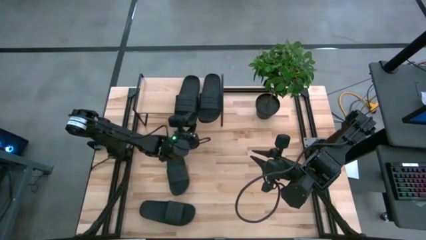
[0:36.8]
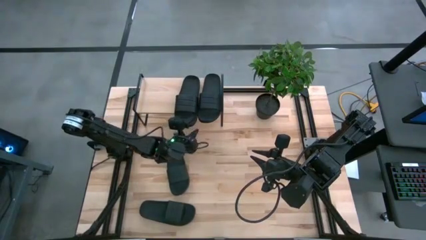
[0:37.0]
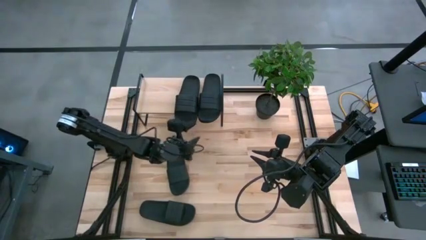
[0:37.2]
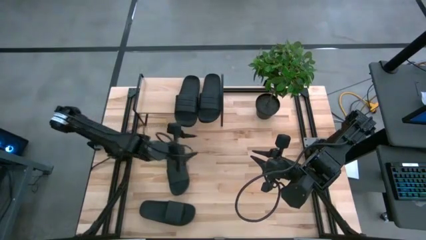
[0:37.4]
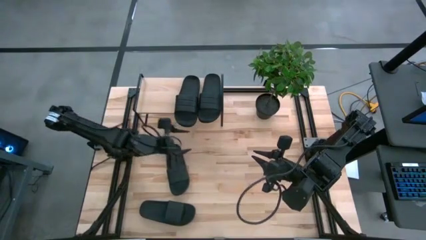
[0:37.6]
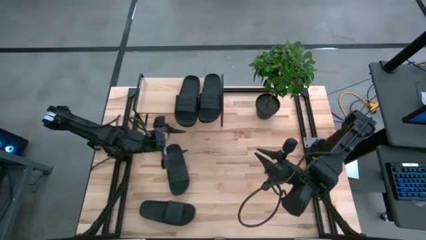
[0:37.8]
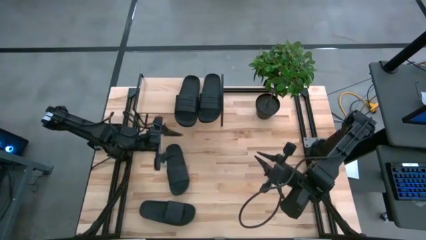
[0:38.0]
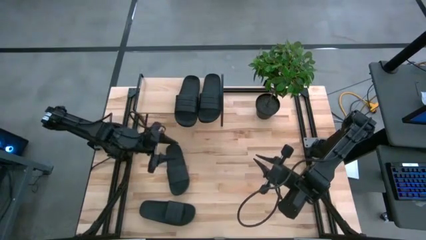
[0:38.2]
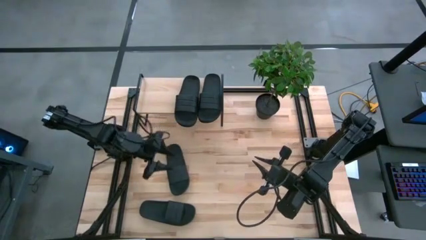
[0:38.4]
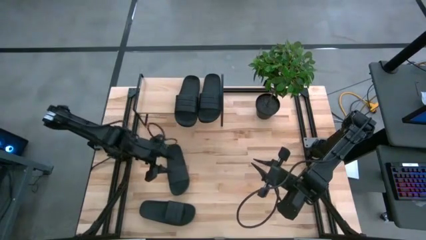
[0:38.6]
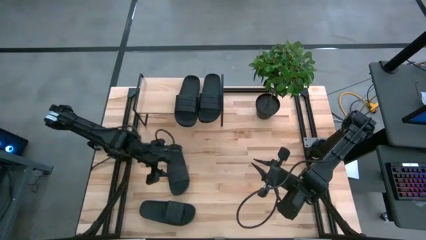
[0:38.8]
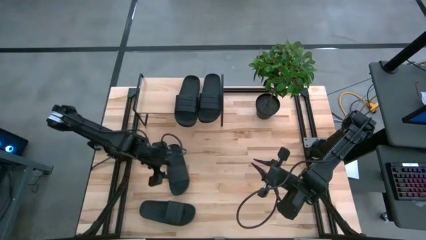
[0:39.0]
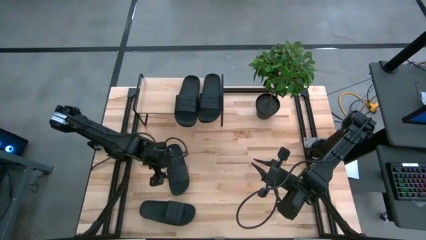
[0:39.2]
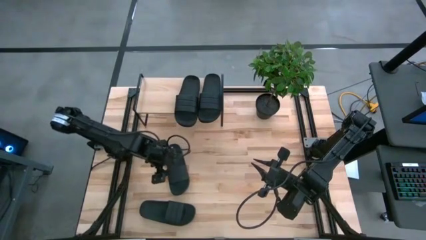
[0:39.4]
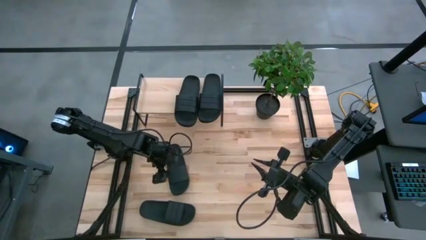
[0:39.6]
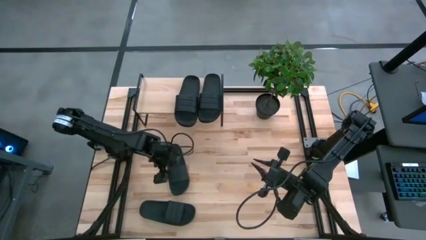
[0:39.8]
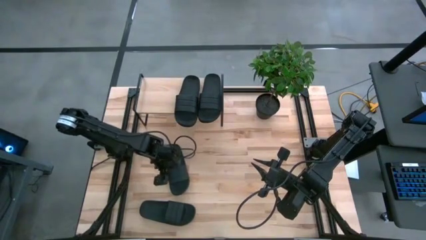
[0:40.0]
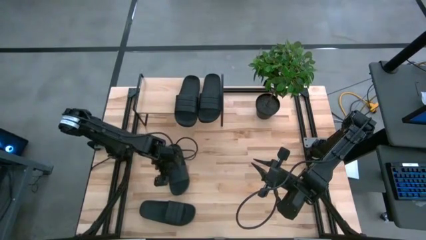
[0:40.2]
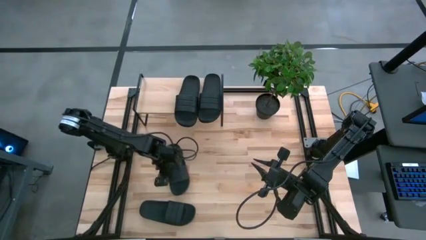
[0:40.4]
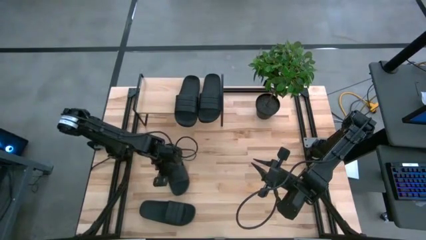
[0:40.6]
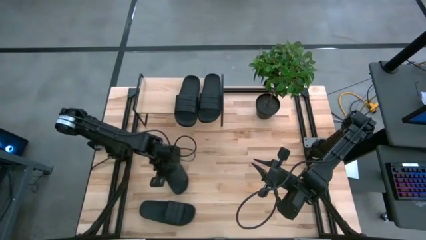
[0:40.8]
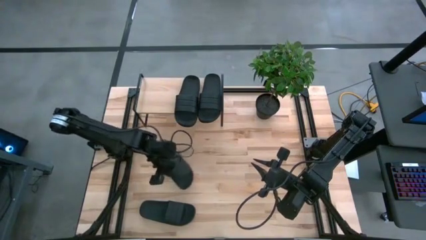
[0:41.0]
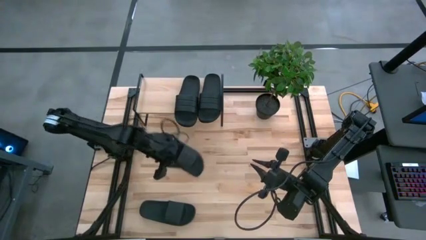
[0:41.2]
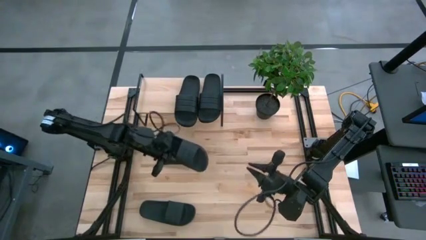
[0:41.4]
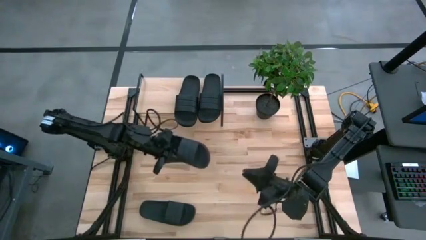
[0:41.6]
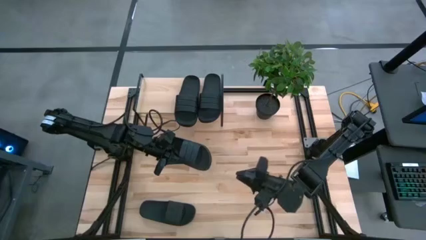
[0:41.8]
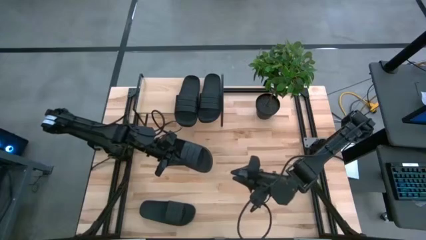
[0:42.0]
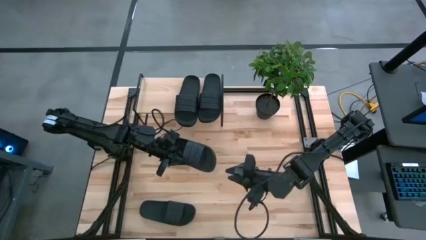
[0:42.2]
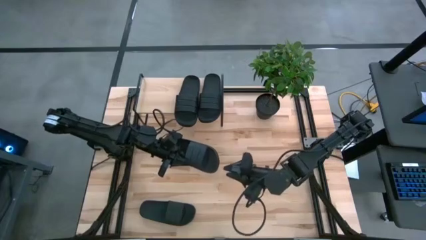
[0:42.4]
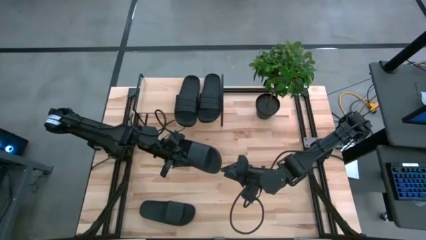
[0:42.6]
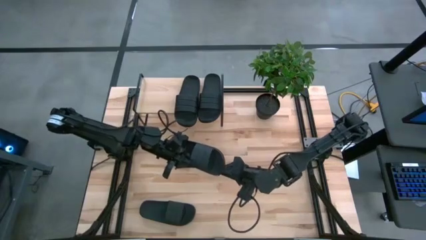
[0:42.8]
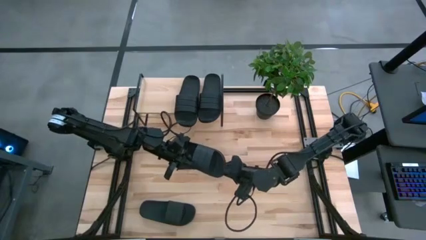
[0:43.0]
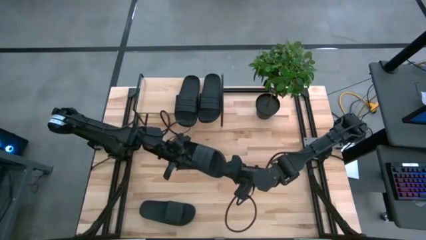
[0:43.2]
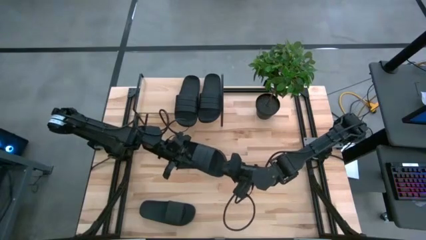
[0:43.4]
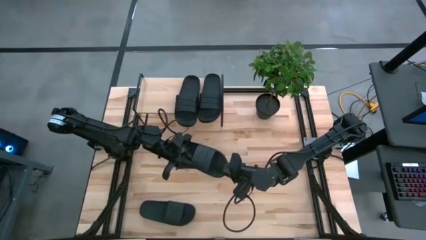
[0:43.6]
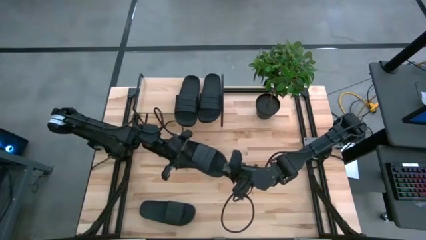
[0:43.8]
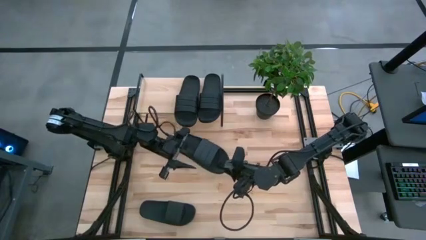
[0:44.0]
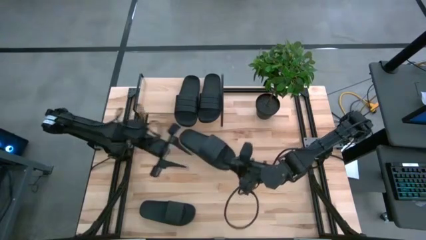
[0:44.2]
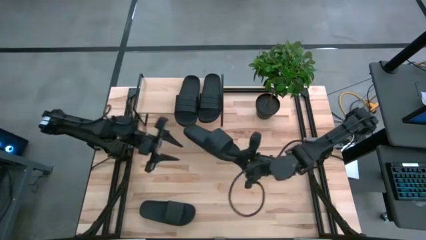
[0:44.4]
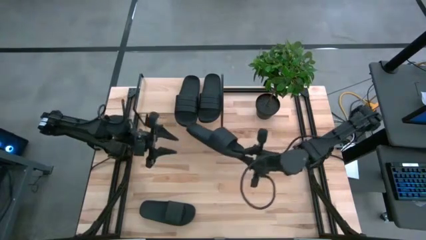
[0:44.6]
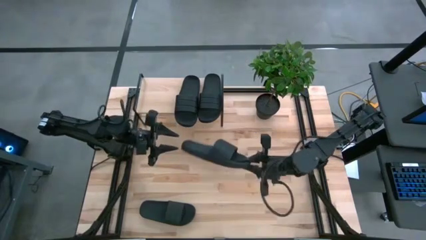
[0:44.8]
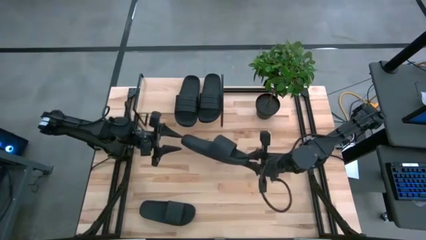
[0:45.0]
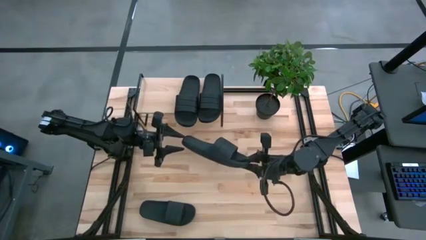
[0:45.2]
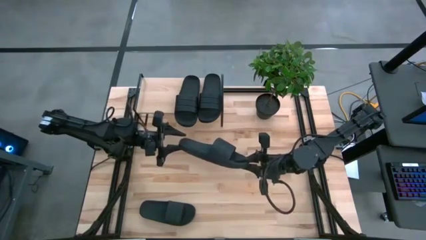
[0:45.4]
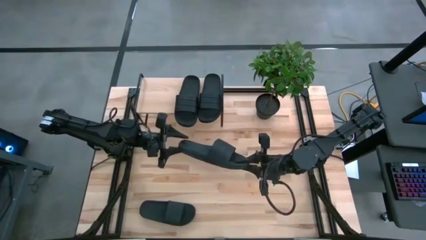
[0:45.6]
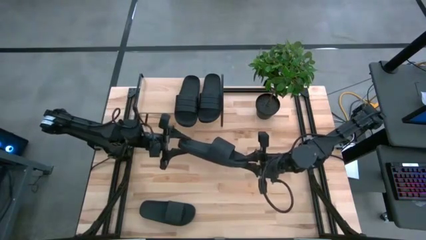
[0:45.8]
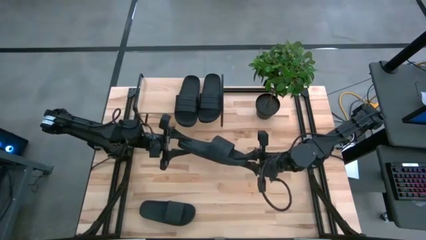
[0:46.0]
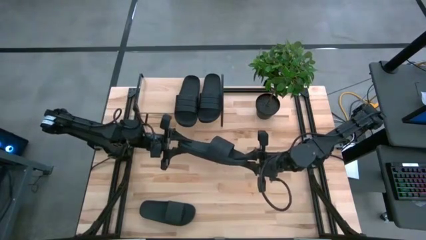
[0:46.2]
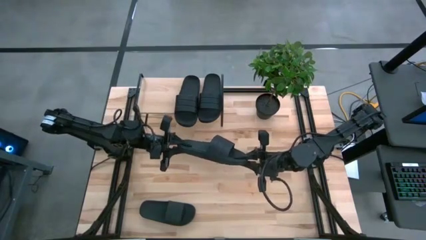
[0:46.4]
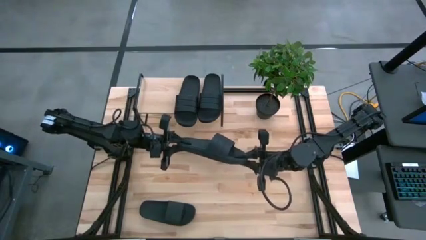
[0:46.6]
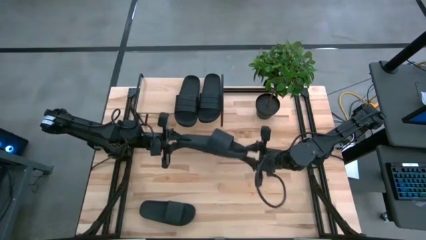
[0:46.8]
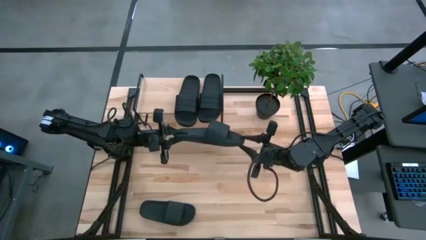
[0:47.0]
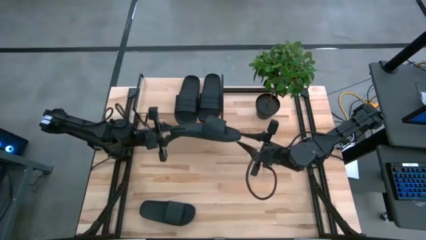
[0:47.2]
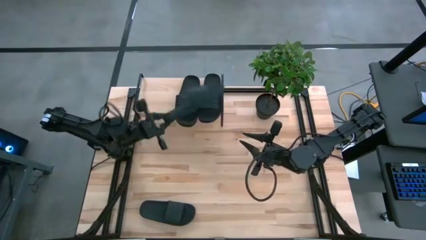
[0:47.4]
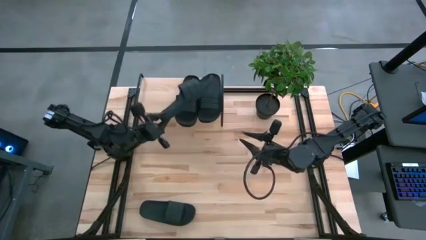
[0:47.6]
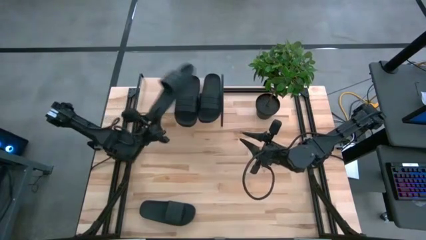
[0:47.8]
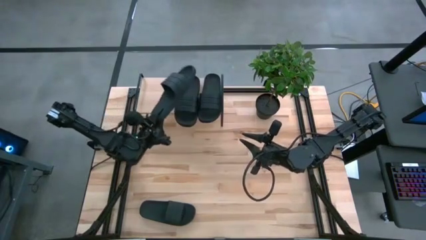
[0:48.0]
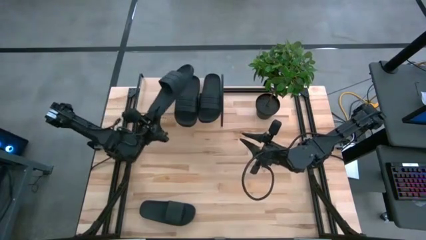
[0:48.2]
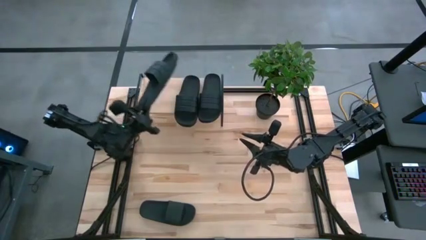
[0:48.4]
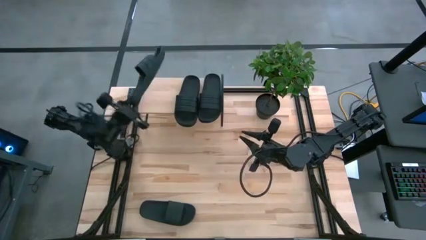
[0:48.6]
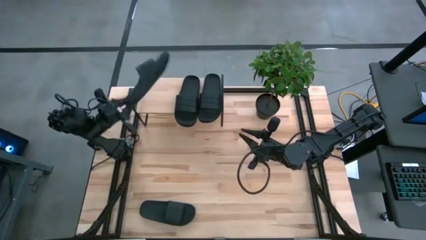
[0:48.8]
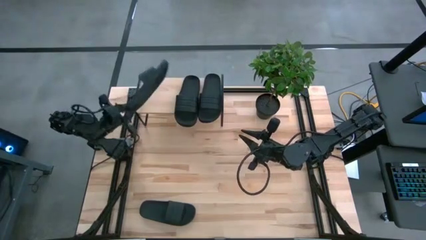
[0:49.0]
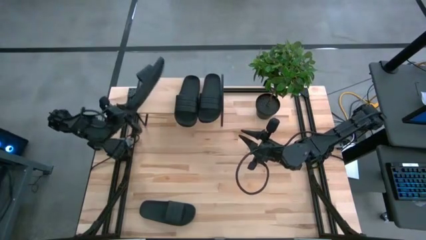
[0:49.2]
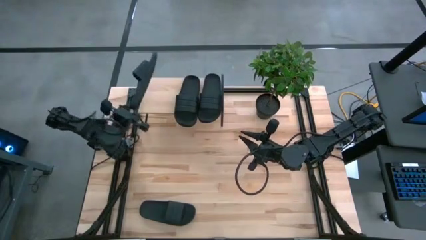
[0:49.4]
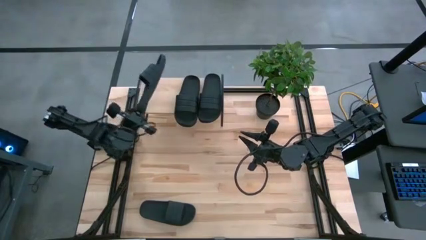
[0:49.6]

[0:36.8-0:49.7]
Task: Pick and place slides into the shelf
Put the top black slipper on the shelf
